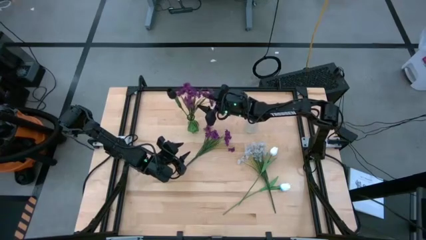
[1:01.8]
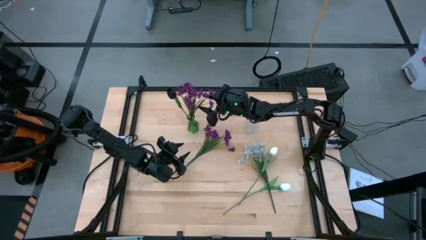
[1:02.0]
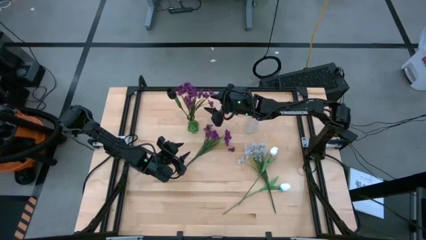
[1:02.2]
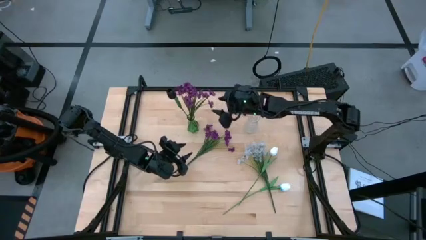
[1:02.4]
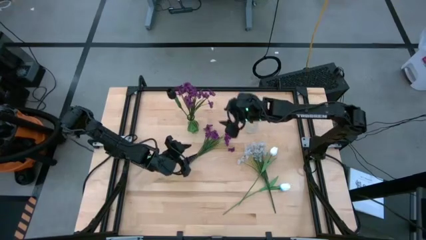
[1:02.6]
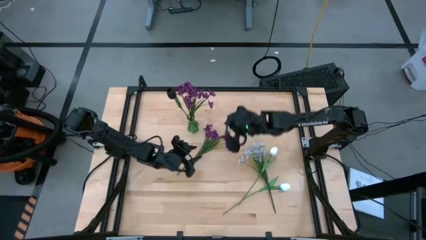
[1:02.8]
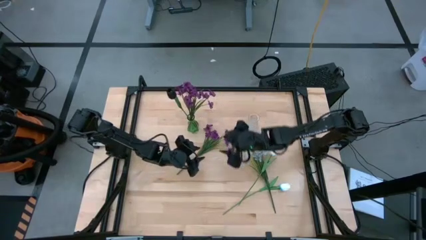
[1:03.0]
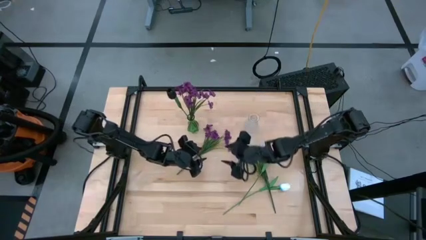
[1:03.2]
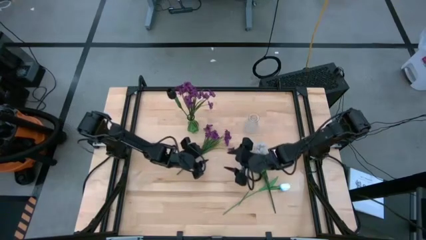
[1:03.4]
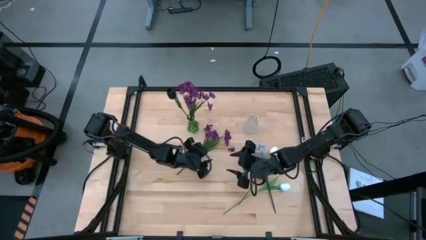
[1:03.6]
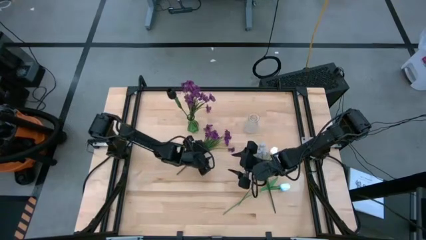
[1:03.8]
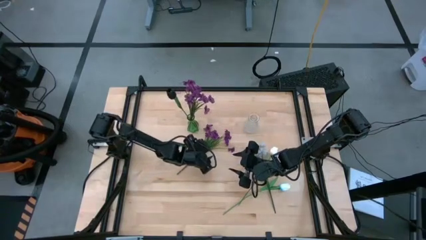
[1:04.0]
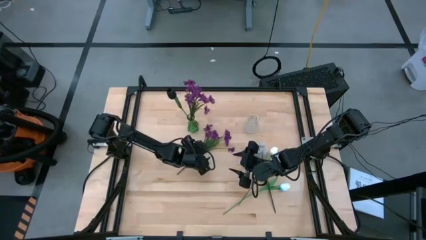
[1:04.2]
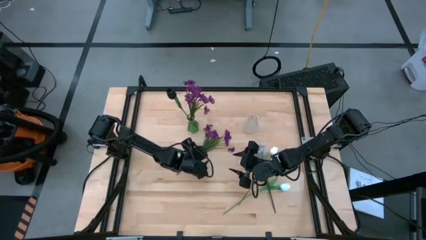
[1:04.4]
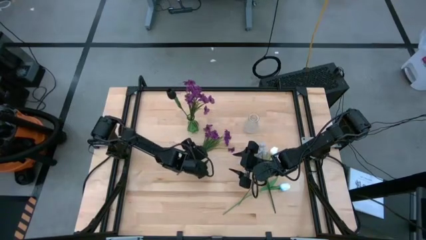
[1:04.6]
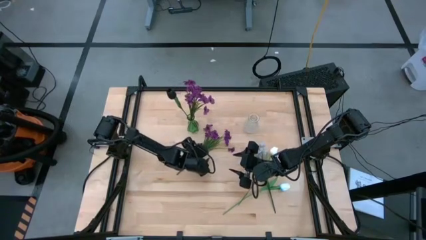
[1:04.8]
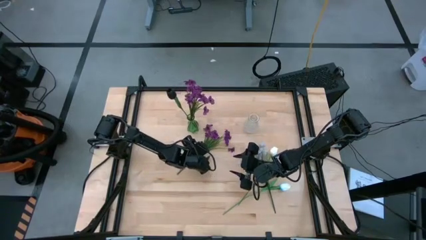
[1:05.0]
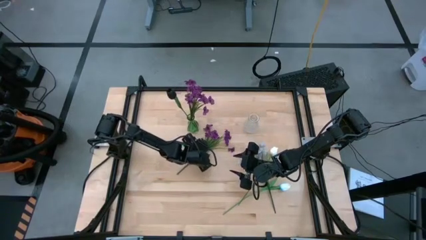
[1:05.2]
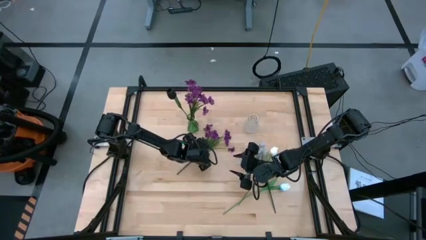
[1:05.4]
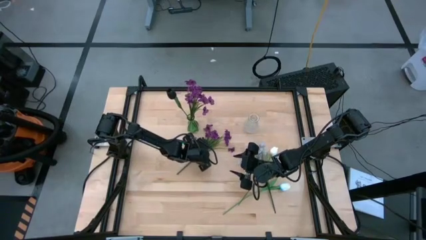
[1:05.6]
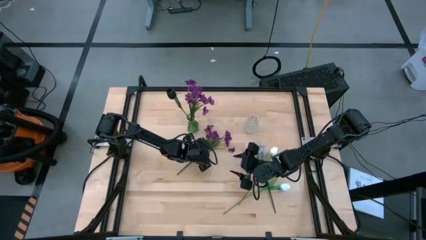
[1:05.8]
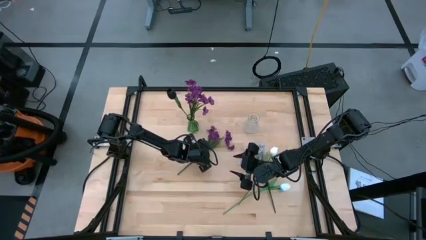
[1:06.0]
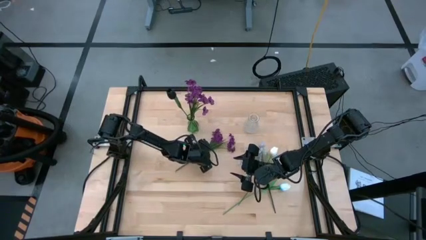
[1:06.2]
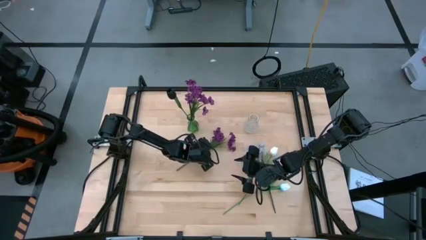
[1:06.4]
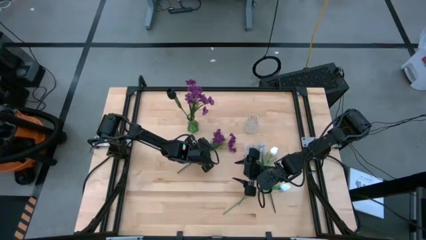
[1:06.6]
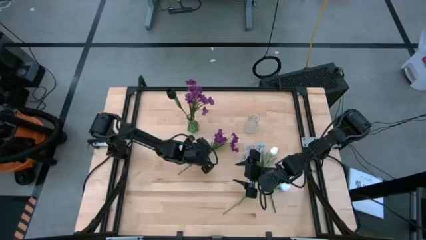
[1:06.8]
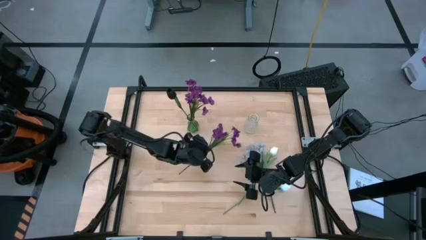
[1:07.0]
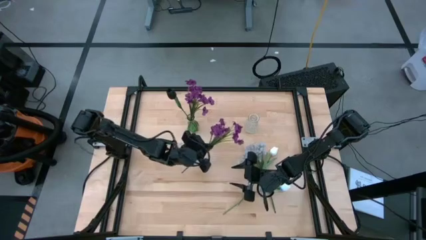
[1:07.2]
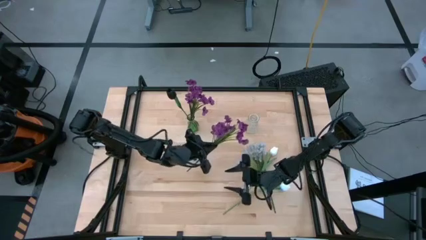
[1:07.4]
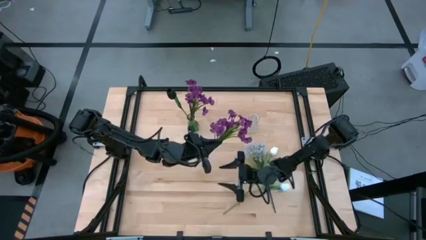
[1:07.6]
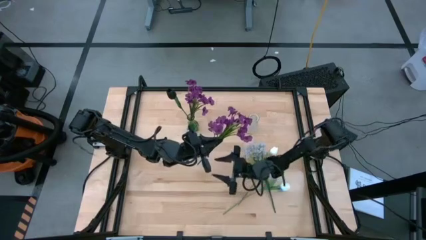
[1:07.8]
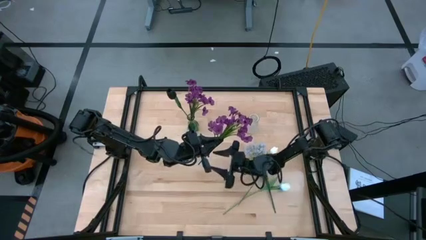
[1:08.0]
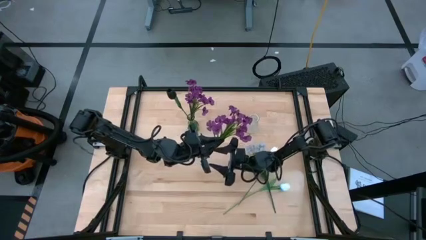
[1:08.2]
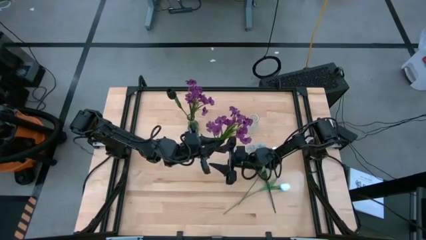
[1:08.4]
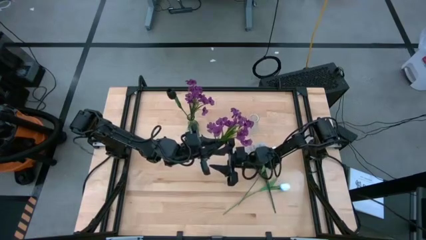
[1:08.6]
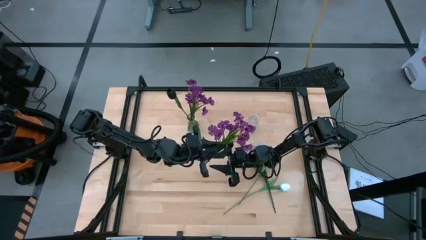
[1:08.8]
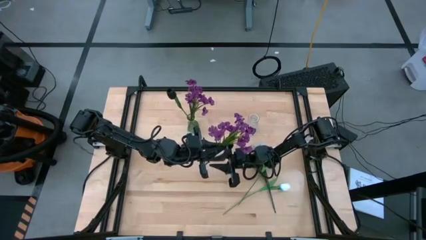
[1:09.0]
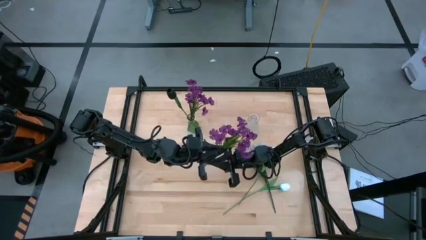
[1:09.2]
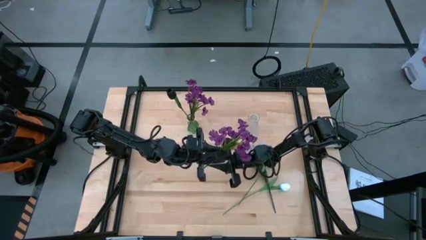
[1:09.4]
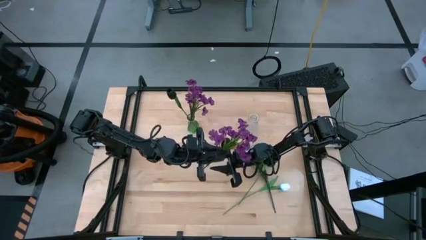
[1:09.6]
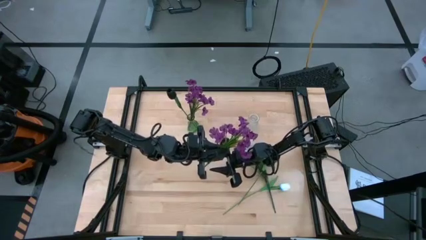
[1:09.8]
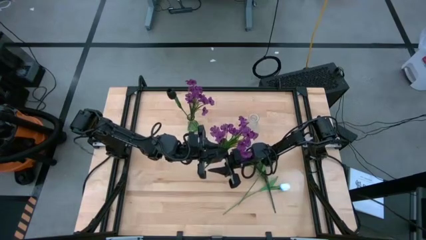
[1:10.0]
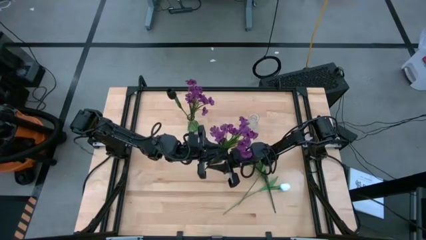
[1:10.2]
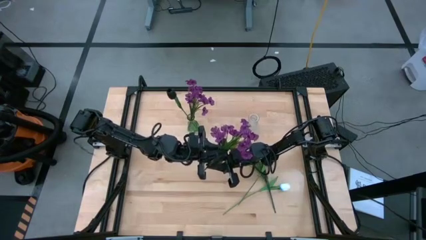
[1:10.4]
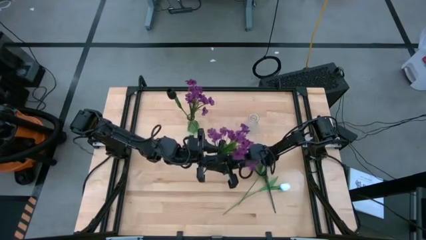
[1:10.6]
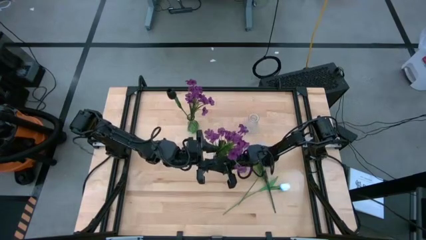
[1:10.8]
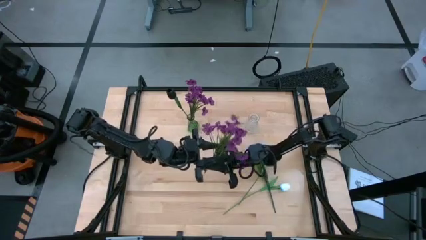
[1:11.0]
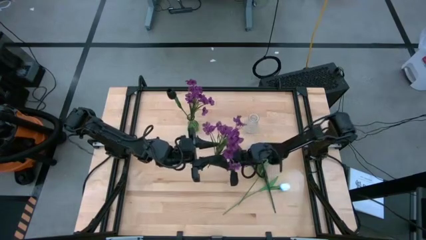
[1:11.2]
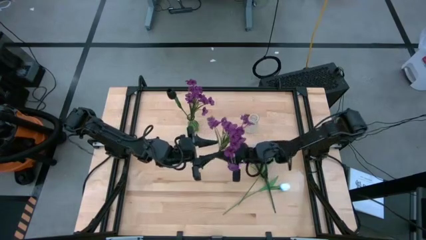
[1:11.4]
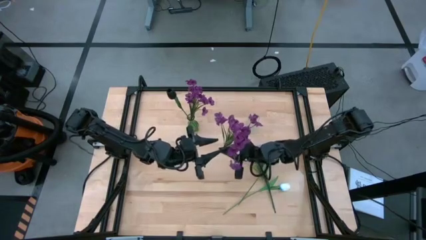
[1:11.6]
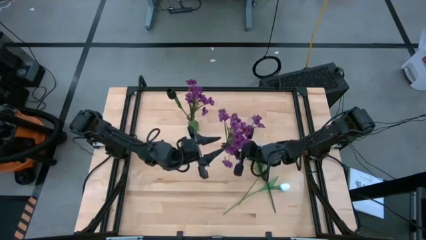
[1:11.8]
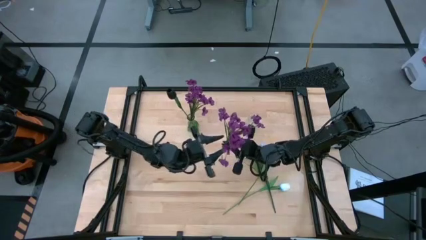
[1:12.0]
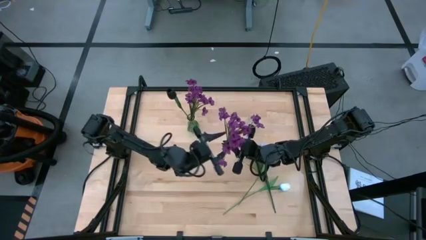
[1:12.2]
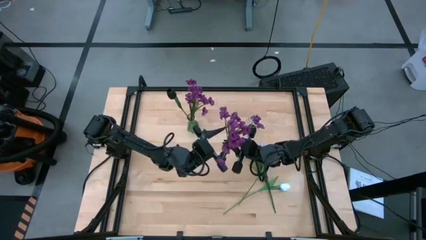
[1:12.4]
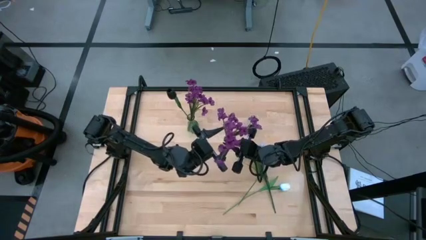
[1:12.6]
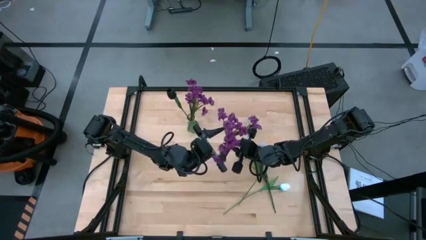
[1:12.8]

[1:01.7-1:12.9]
Task: Sort flowers into vase by color
Put the purple flowers into the green vase

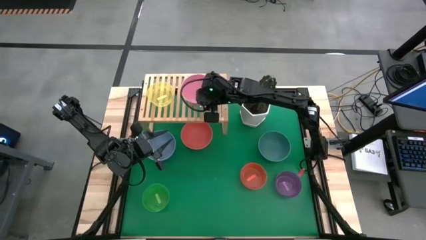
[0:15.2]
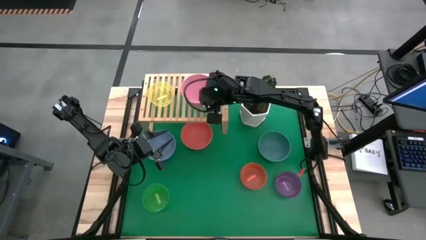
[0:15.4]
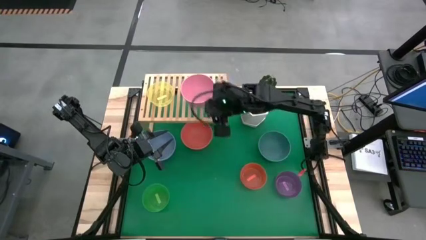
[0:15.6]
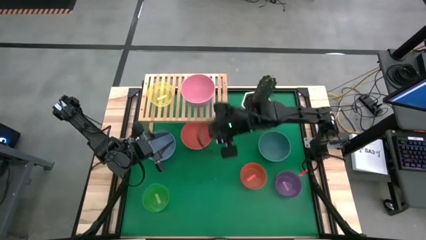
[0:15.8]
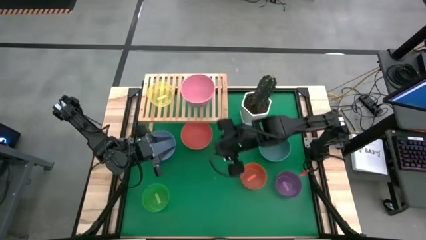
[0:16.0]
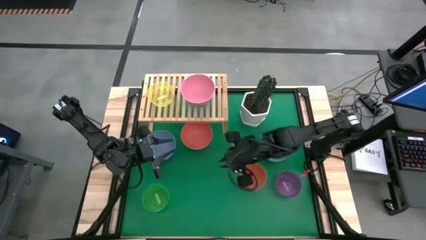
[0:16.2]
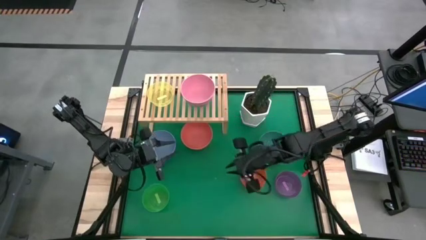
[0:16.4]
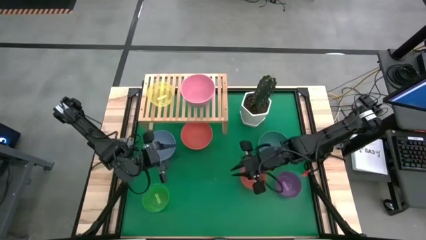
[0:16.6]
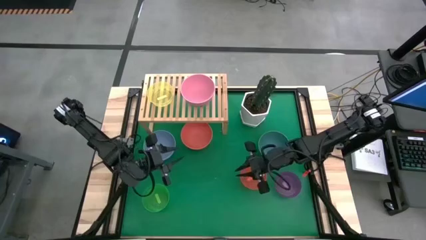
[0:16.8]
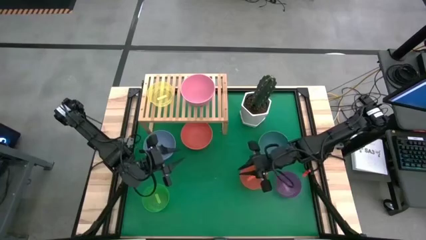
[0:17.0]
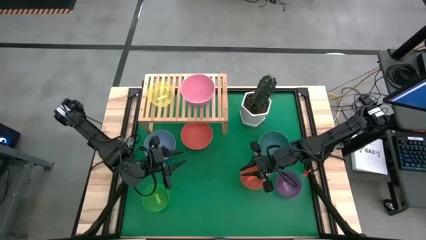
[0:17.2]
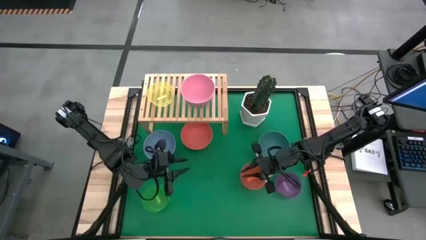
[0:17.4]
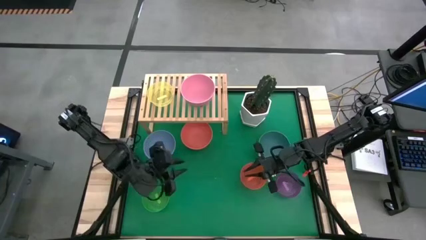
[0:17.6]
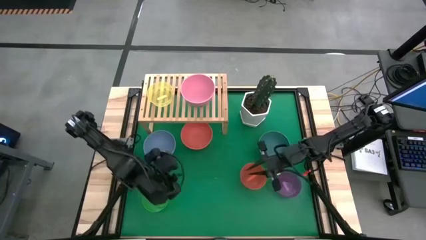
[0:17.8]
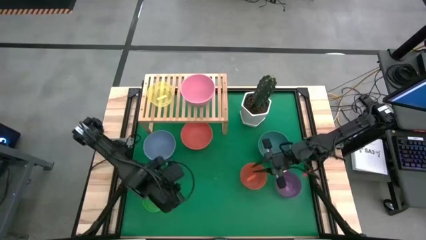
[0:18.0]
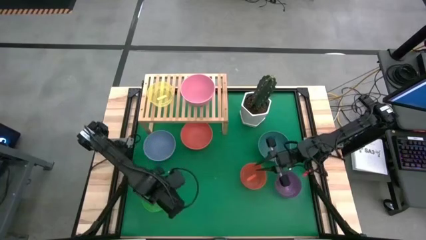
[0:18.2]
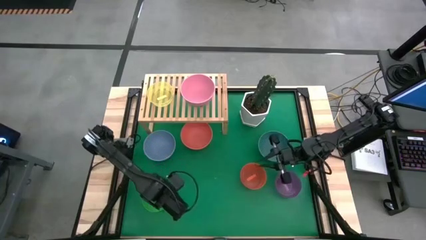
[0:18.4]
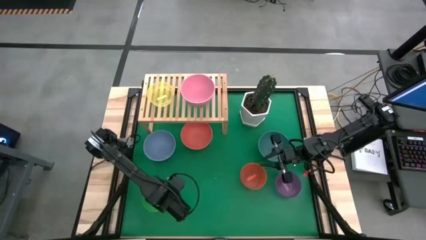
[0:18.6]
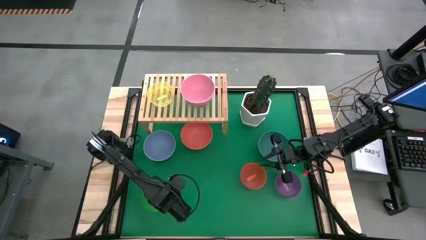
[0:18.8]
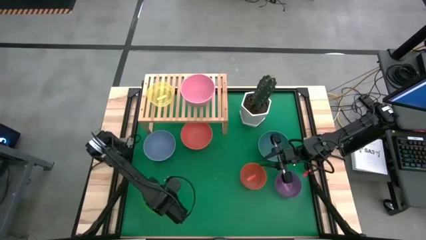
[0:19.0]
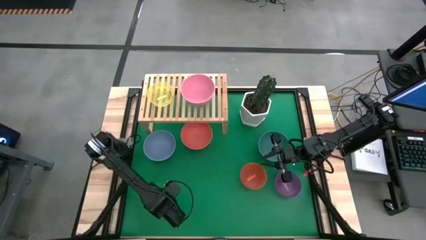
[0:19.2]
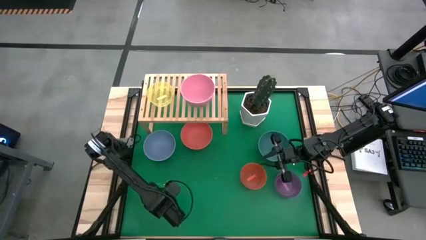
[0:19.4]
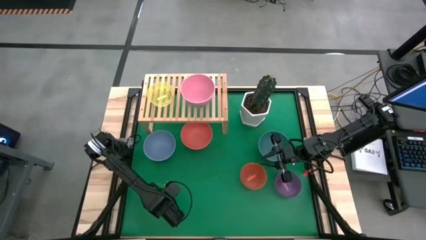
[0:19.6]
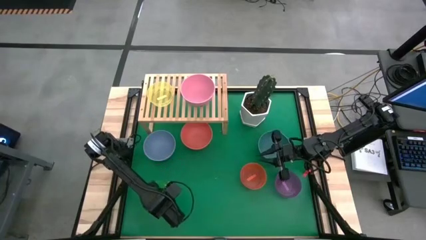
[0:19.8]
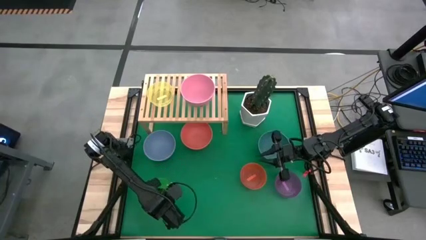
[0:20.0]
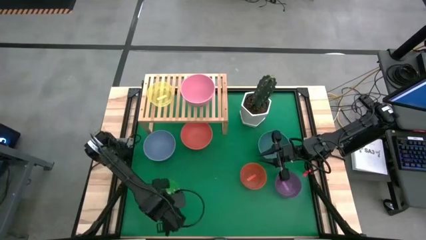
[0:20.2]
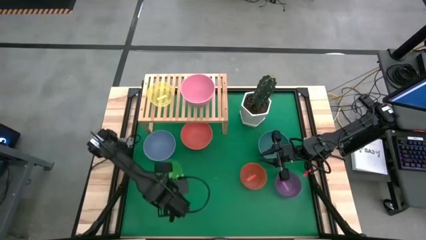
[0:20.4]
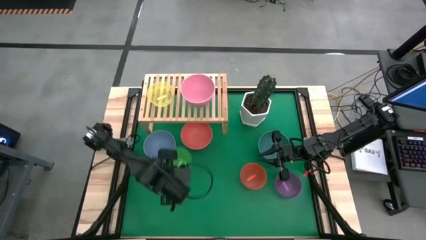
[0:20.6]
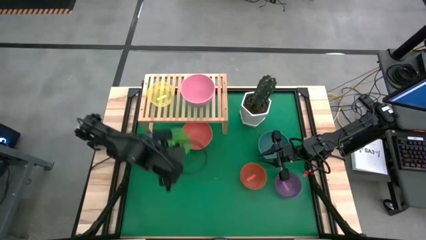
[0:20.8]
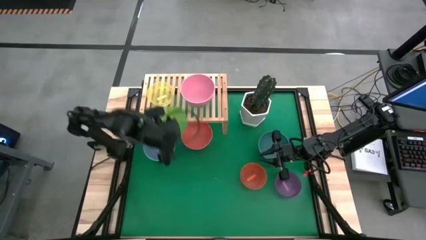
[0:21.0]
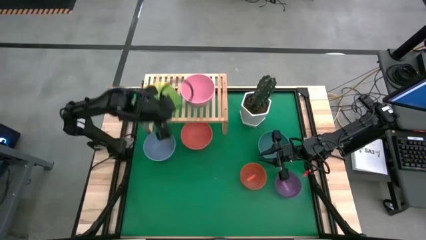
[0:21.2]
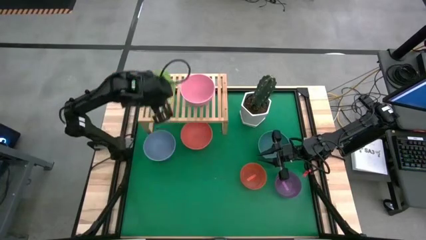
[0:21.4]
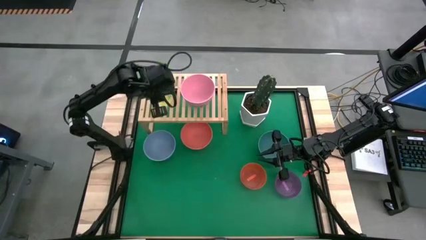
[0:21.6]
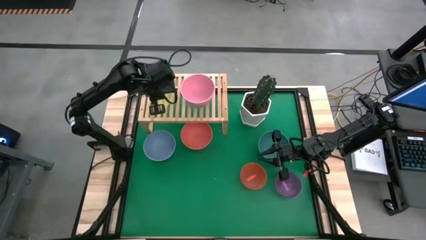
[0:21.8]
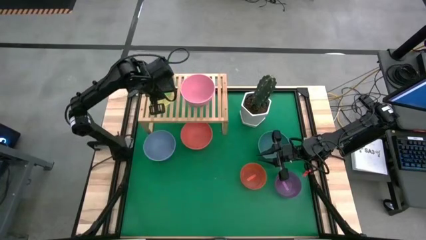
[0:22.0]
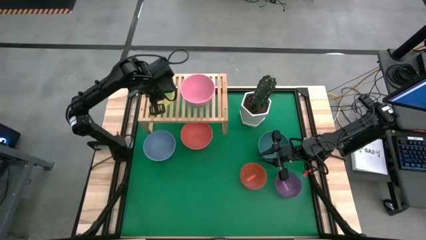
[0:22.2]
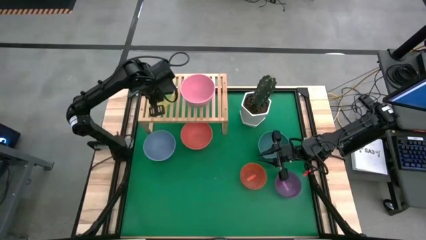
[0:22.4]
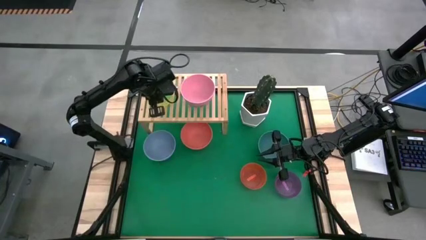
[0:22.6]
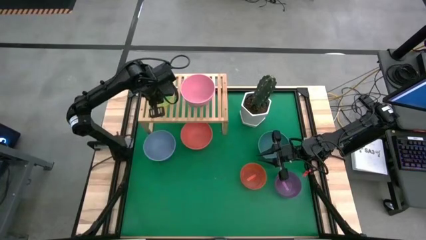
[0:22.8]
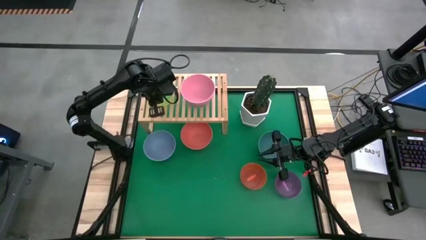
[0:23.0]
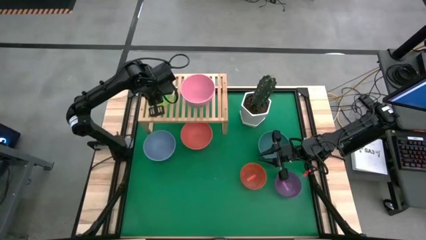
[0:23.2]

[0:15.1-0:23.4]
Task: Place and stack bowls onto a shelf
Stack the green transparent bowl on top of the yellow transparent bowl on the shelf
